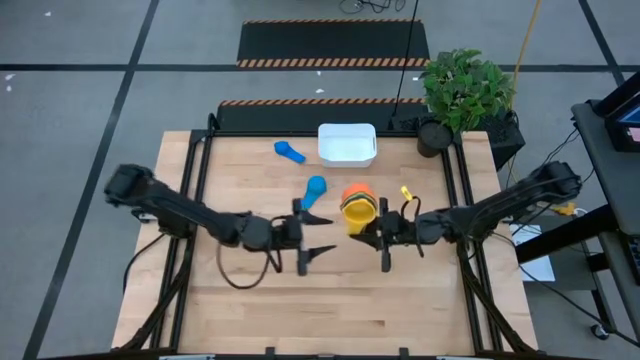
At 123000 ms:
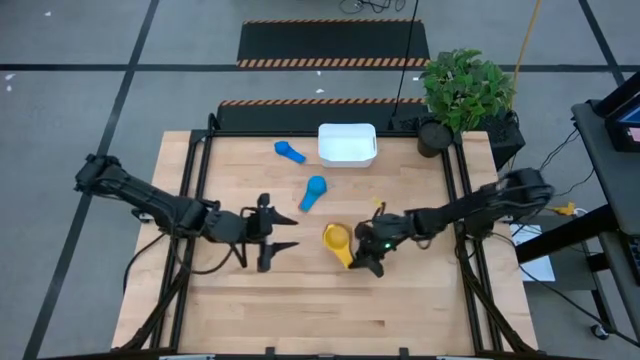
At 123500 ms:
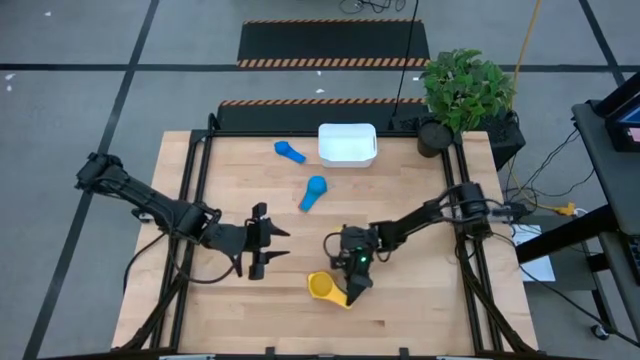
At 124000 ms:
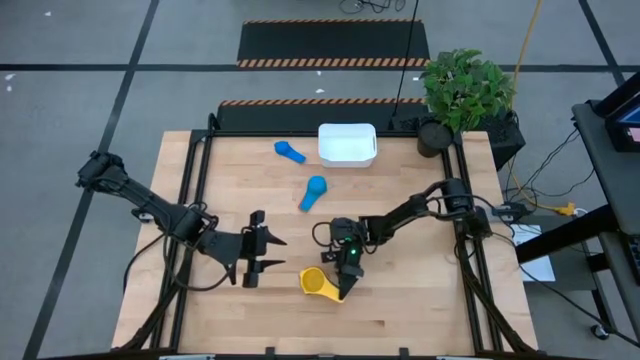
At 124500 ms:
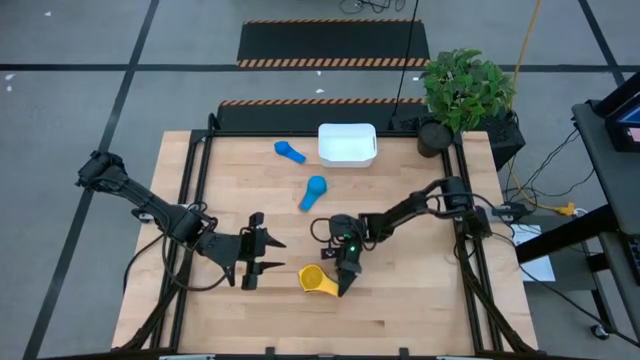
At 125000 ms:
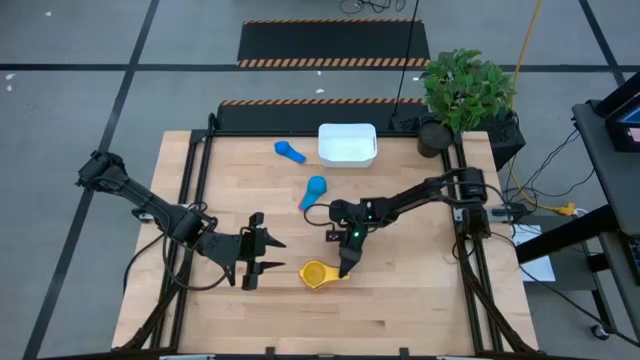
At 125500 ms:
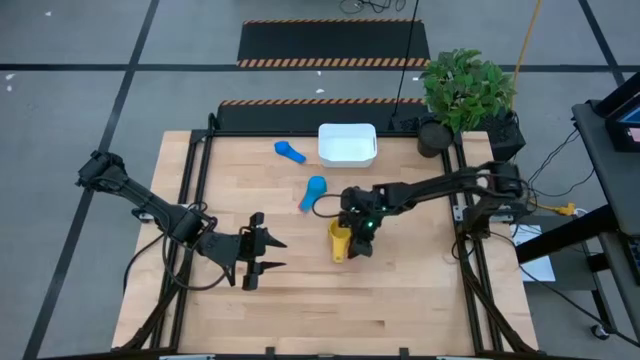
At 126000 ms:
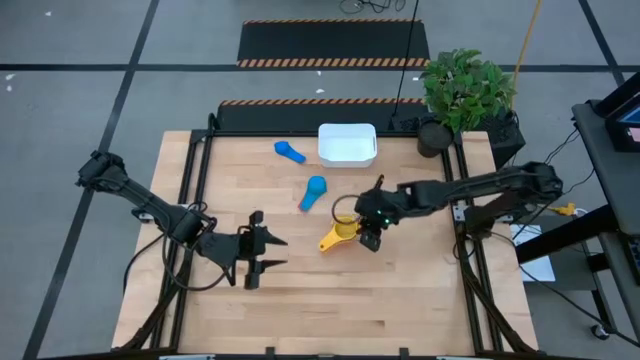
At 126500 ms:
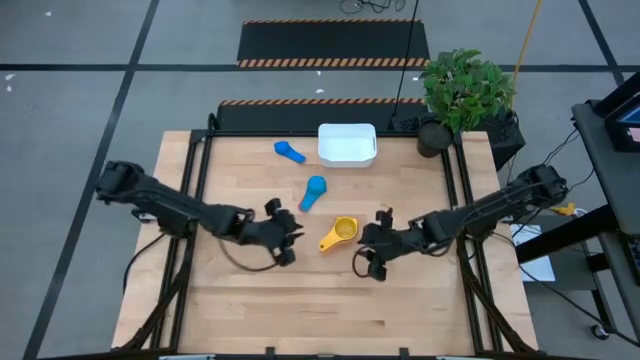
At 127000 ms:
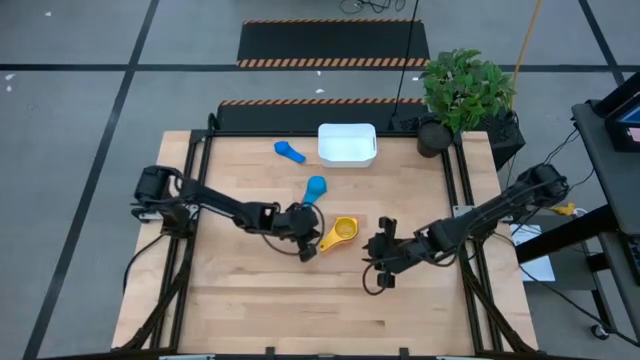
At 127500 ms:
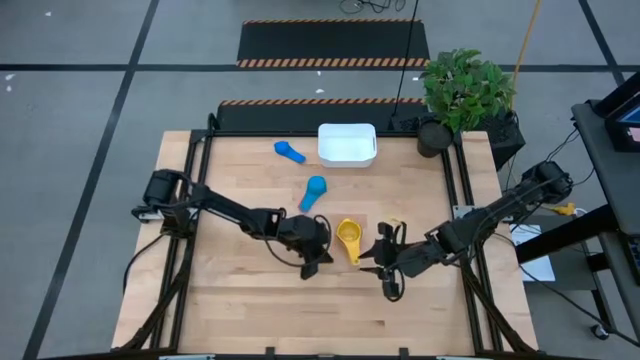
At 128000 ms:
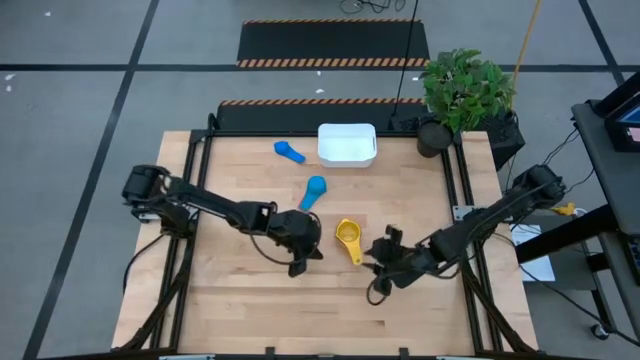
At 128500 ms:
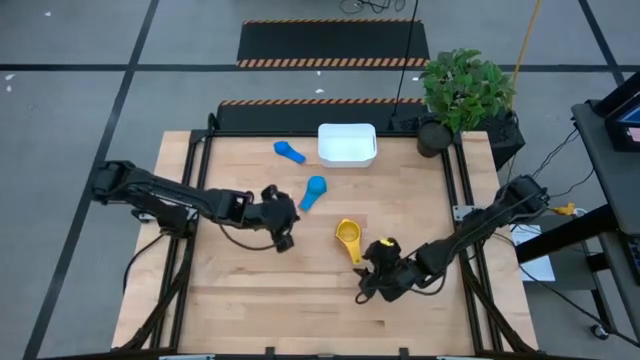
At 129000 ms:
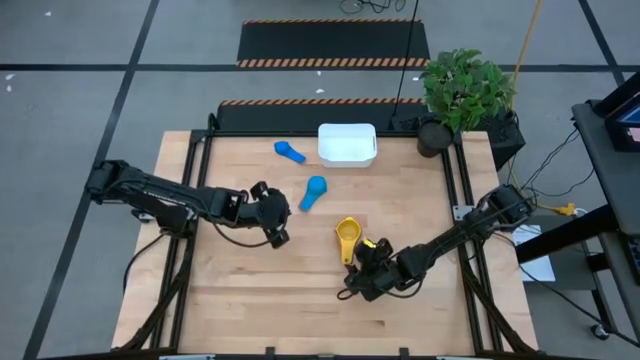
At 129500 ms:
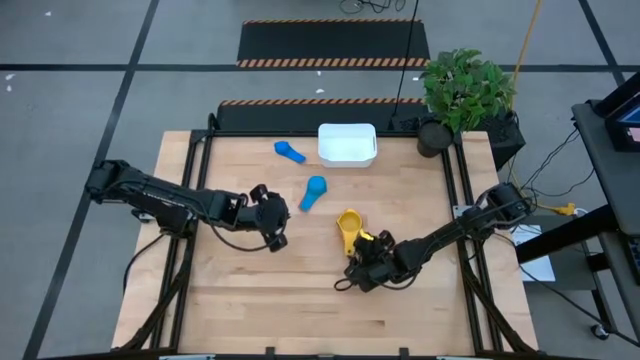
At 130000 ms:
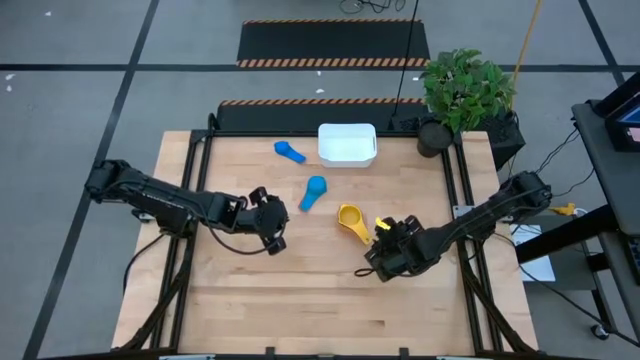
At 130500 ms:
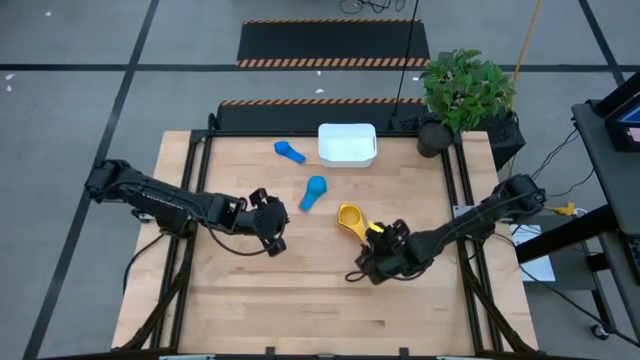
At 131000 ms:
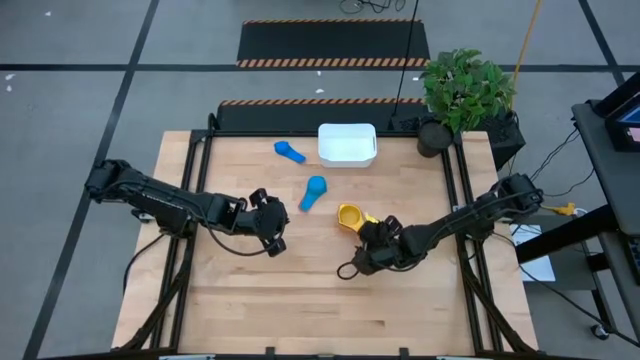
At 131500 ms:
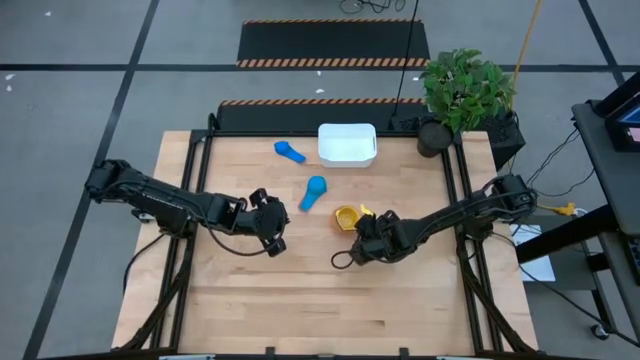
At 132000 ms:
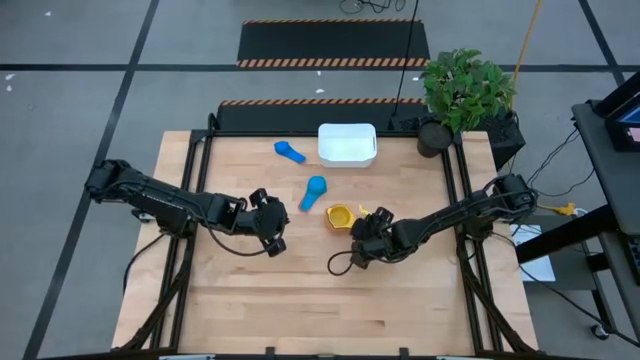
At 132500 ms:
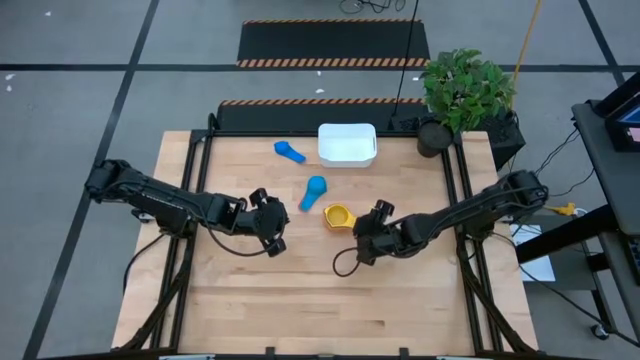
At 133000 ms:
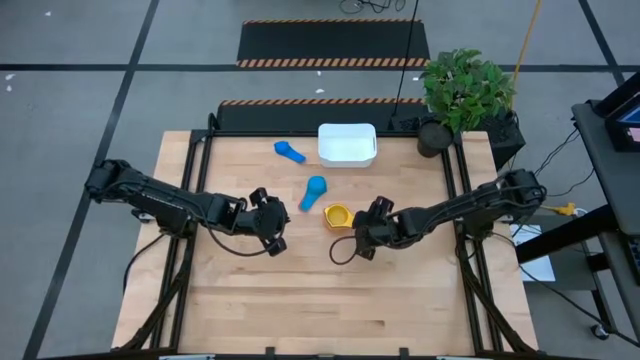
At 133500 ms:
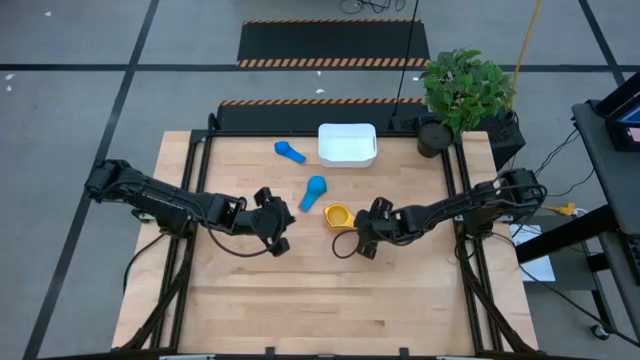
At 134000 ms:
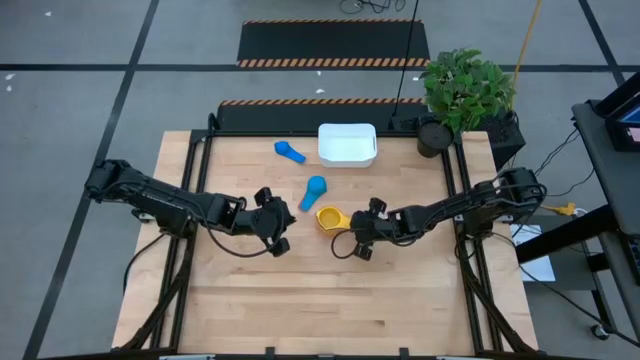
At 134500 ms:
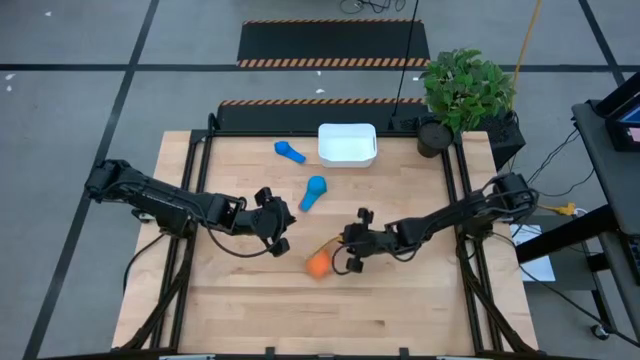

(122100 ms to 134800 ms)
Task: Nest measuring cups in basket
Put the nested measuring cups into the white bin

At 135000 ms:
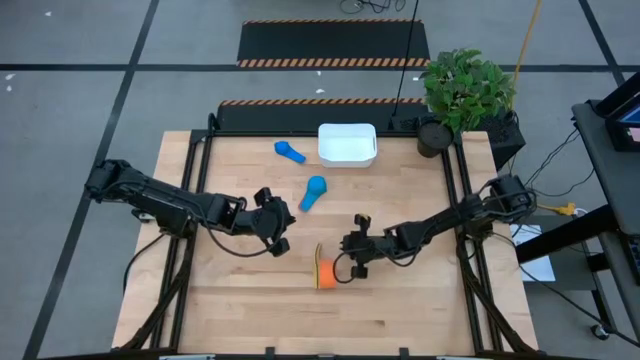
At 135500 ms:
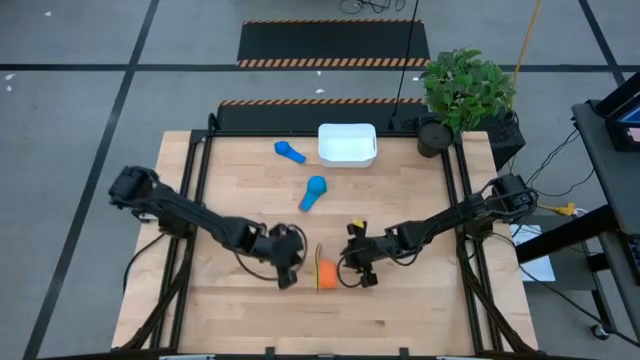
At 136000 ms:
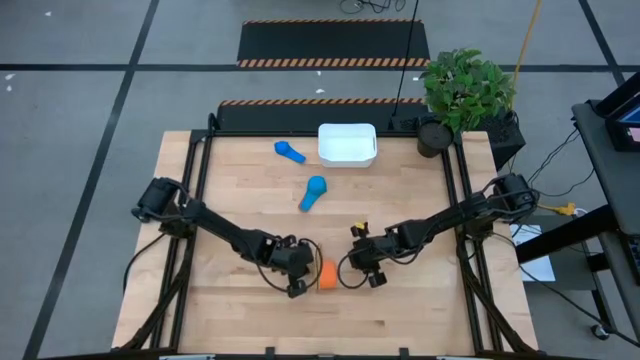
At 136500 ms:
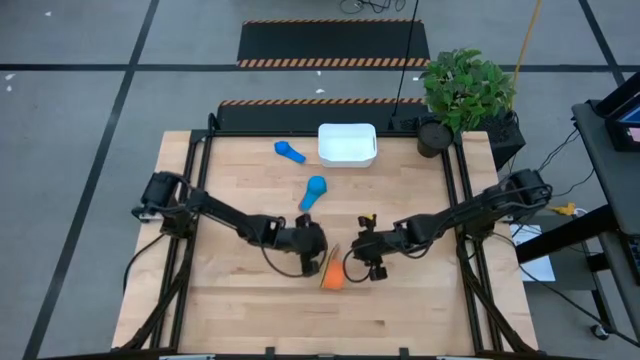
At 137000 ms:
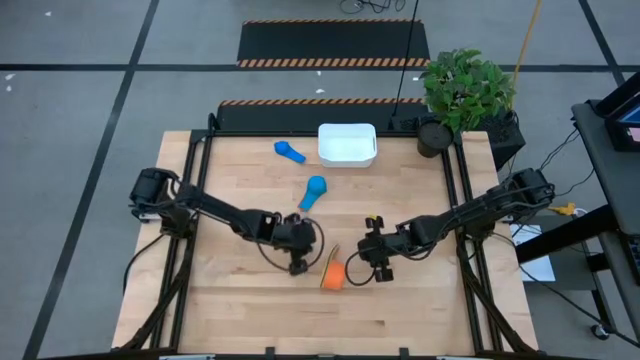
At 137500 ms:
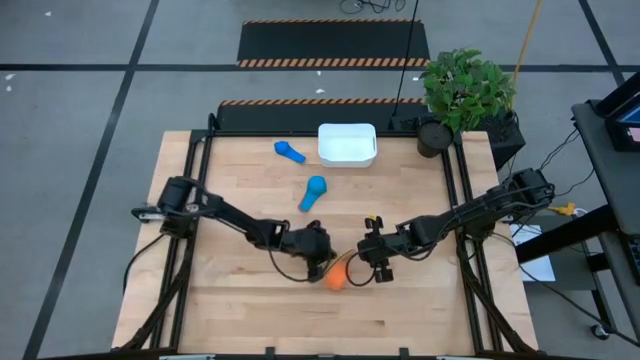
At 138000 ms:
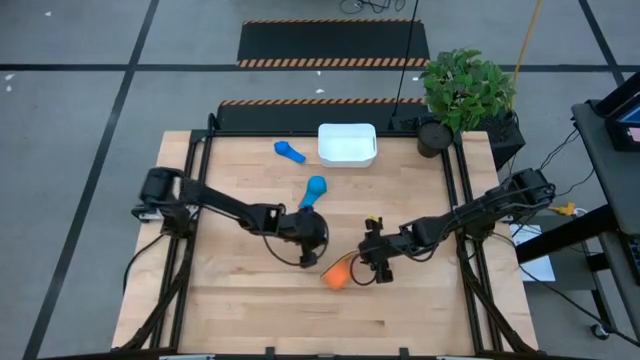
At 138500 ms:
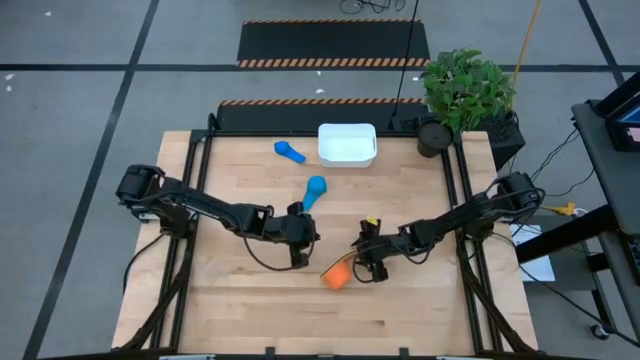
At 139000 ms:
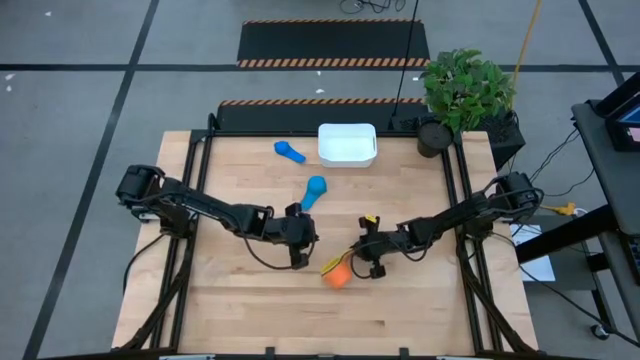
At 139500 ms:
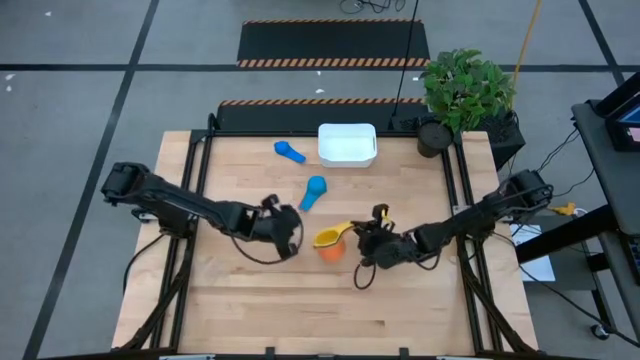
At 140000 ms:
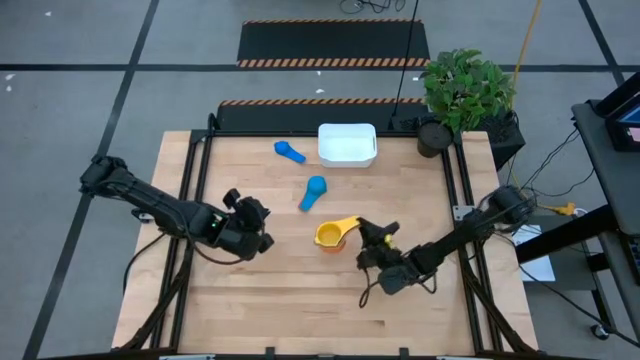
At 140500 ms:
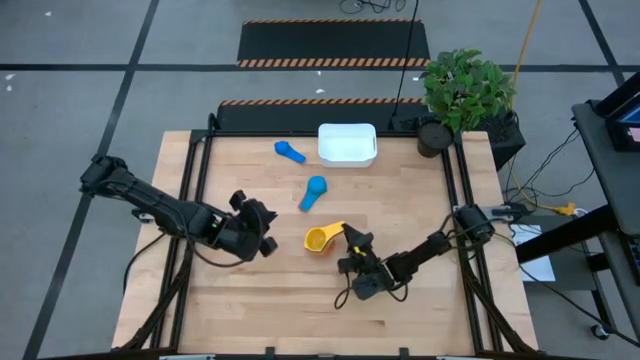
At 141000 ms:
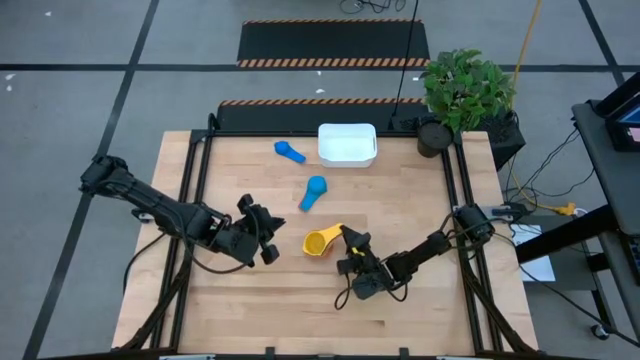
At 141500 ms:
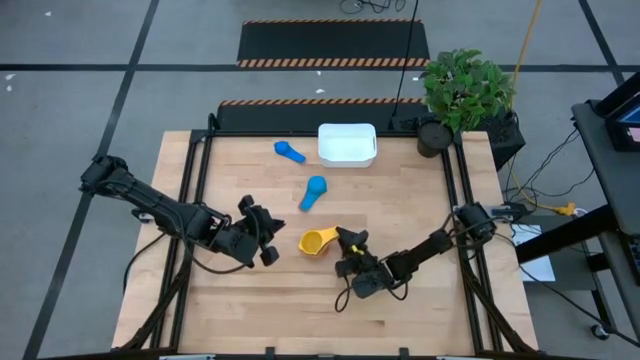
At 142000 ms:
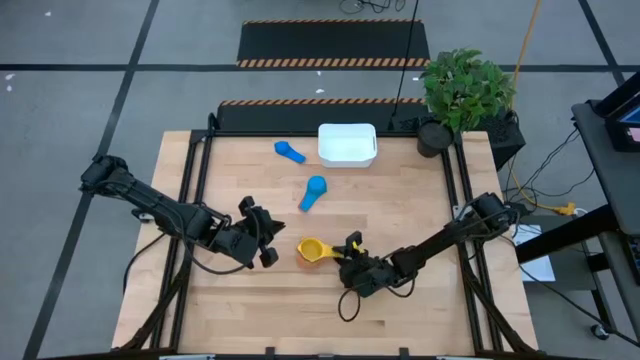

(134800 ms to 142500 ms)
Adjust the nested measuring cups

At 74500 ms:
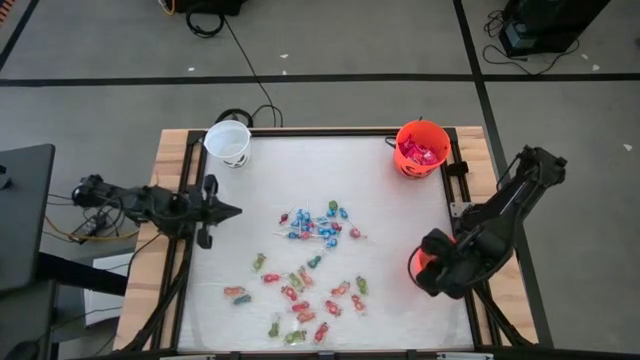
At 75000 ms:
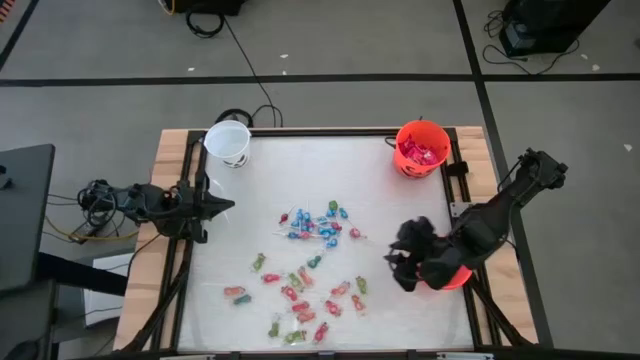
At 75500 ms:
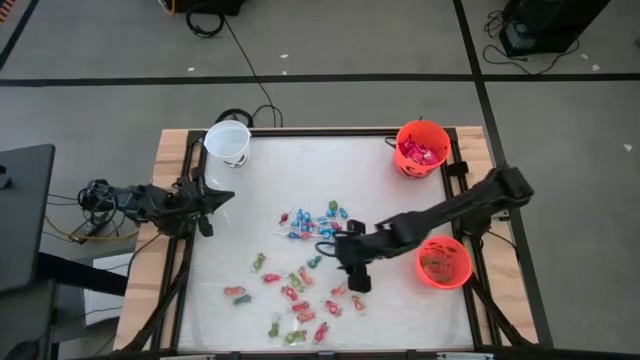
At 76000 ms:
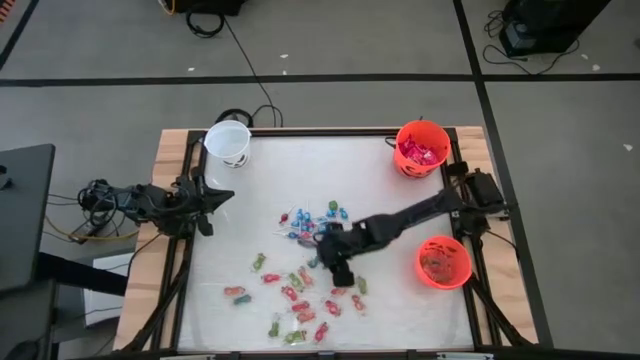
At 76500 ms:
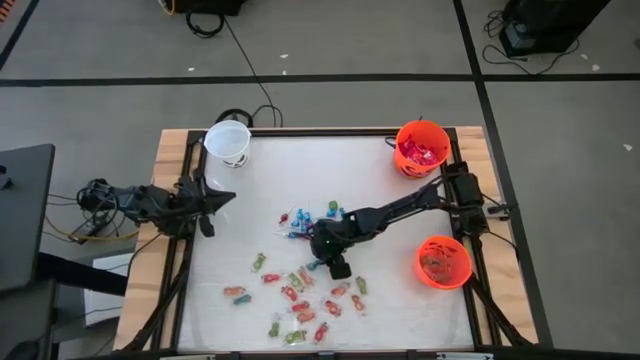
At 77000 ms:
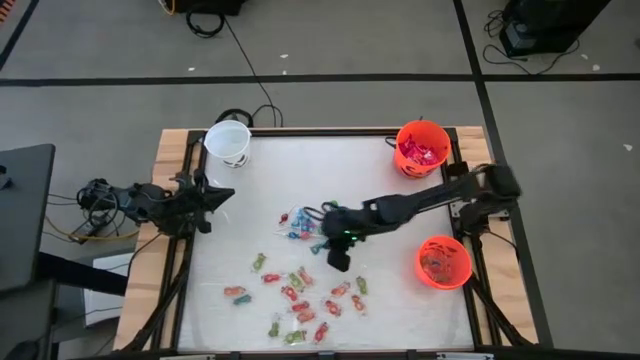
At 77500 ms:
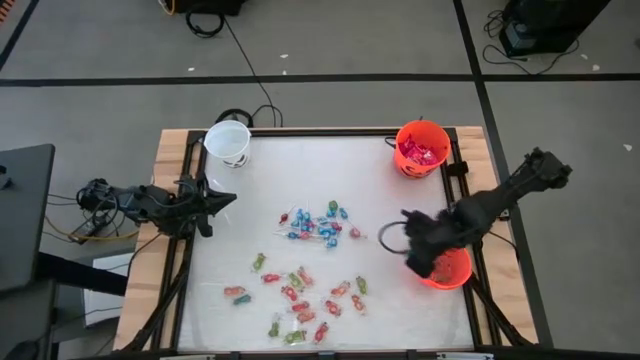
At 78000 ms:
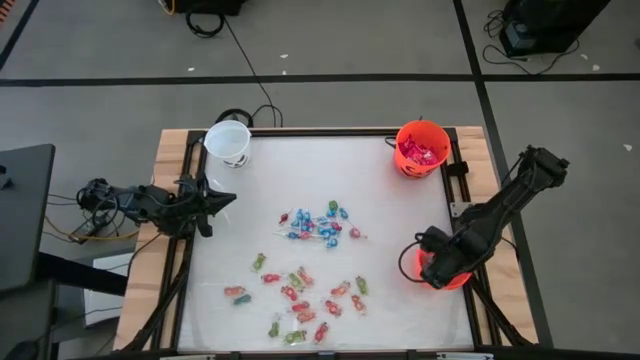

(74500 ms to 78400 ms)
Task: Sort candy by brand, put in halloween buckets
Put the blue gummy into the bottom orange bucket
